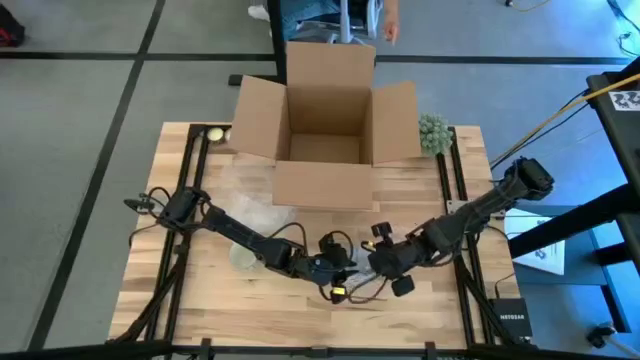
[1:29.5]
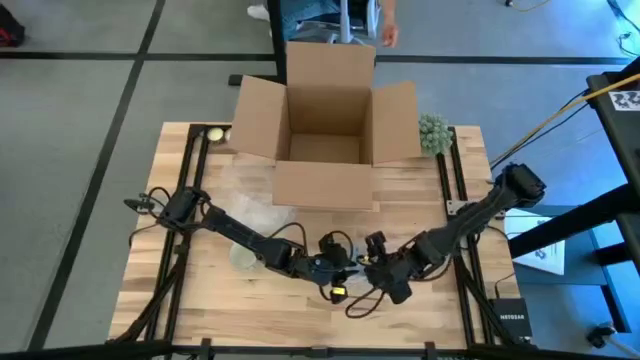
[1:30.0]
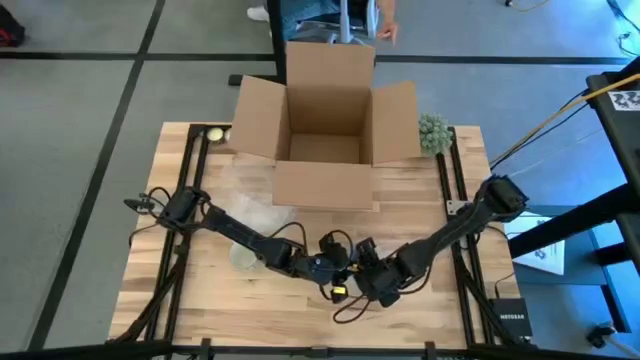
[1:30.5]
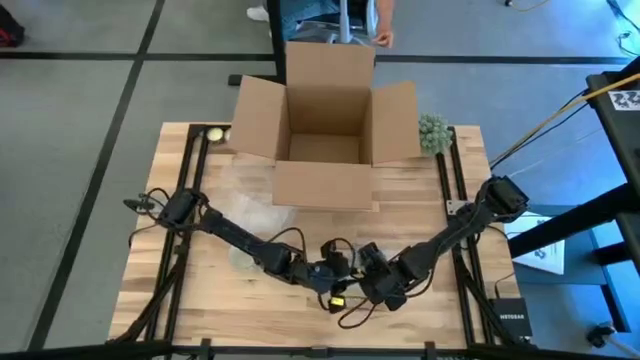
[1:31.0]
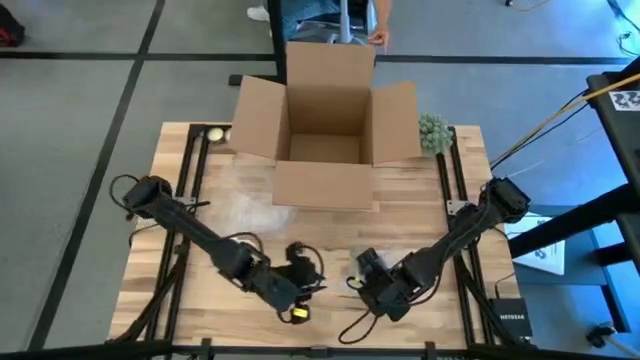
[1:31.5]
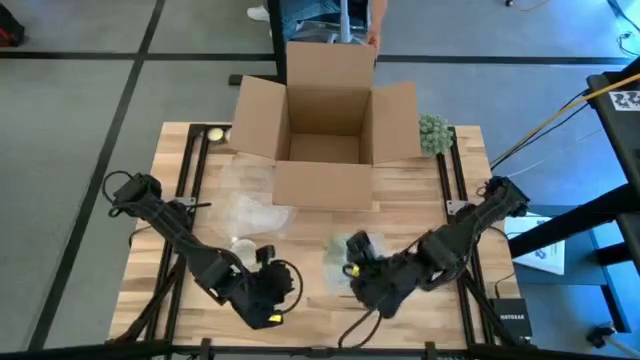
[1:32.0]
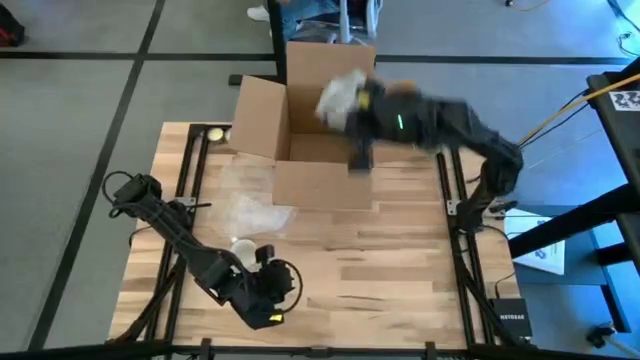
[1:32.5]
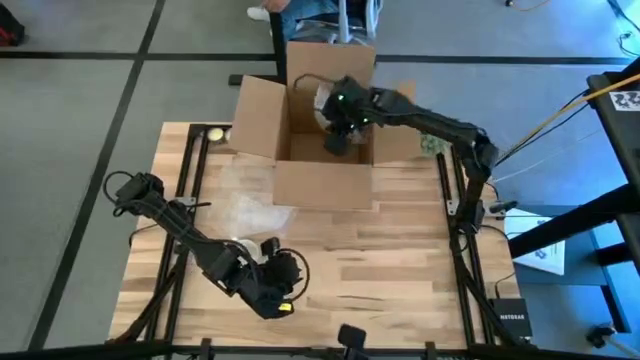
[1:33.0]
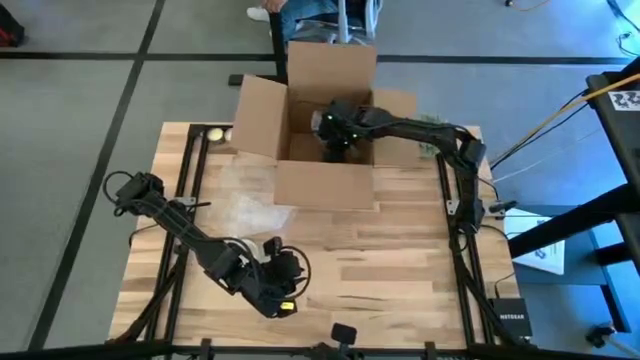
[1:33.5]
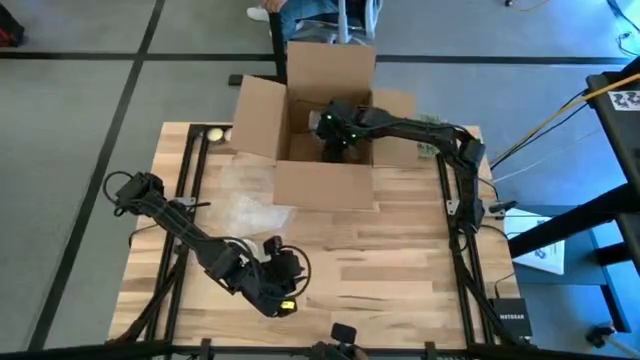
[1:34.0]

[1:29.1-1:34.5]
Task: wrap mug
Put the green mug into the box

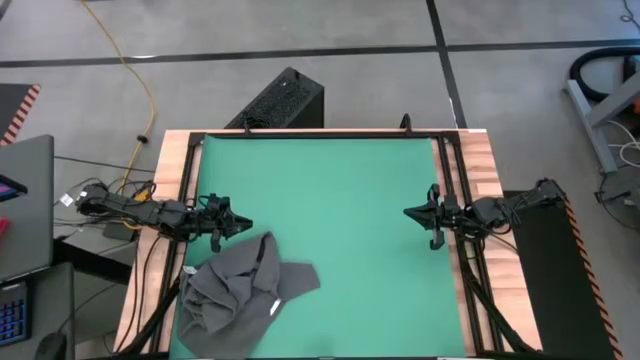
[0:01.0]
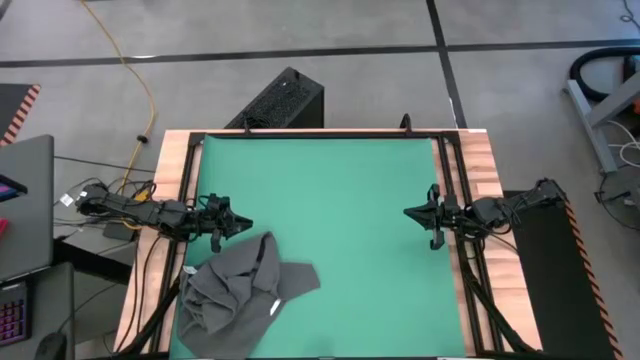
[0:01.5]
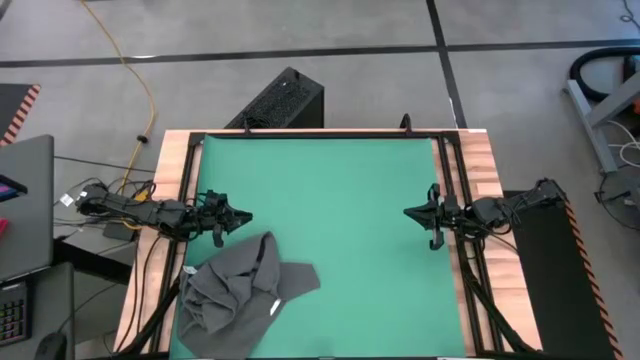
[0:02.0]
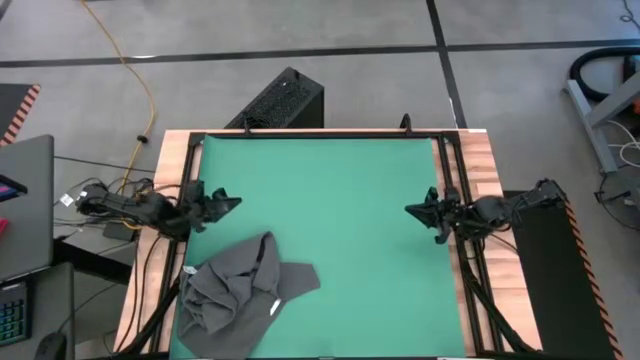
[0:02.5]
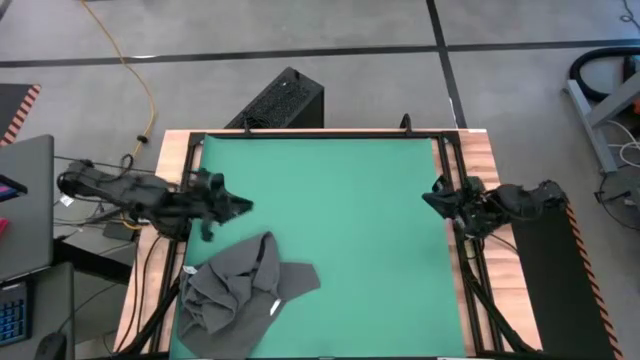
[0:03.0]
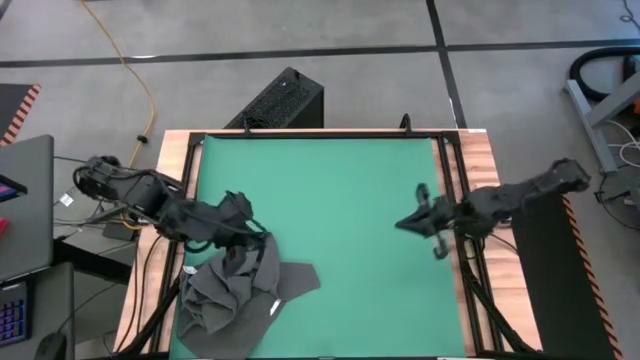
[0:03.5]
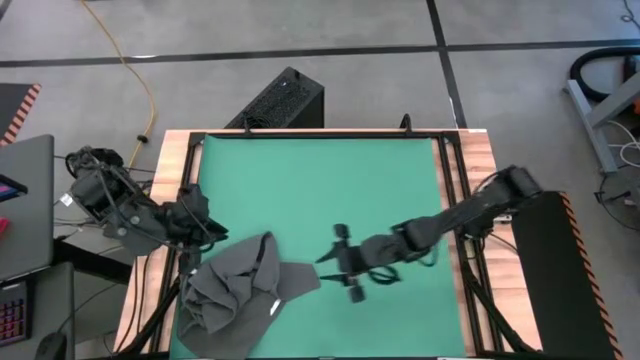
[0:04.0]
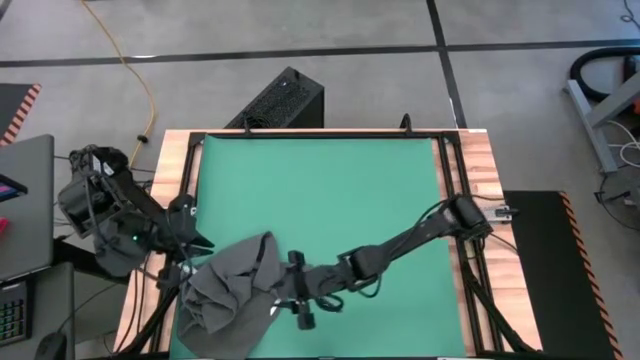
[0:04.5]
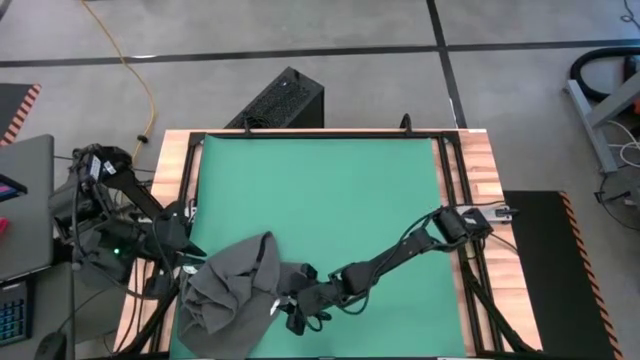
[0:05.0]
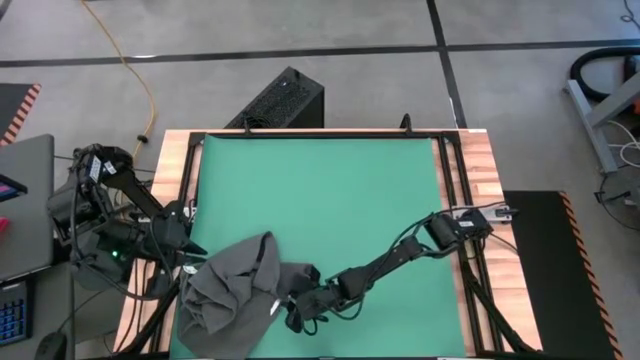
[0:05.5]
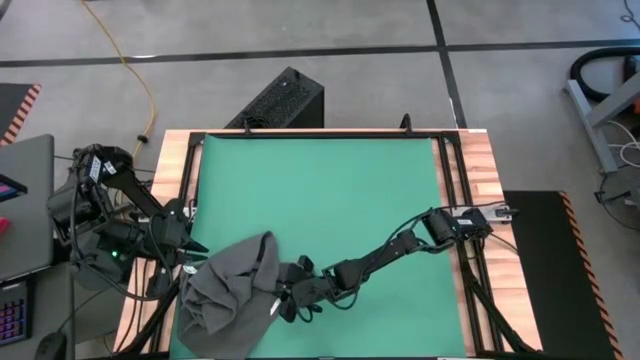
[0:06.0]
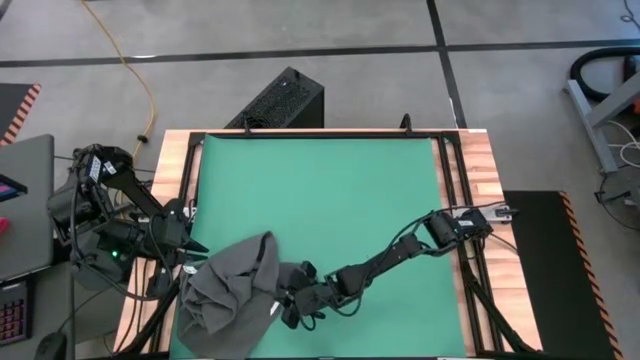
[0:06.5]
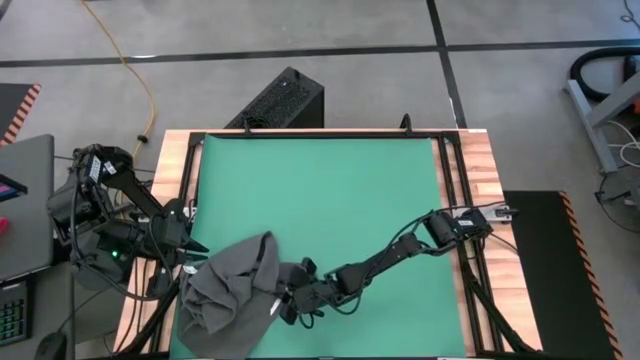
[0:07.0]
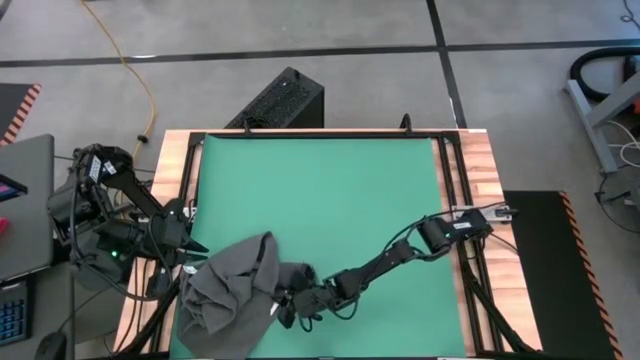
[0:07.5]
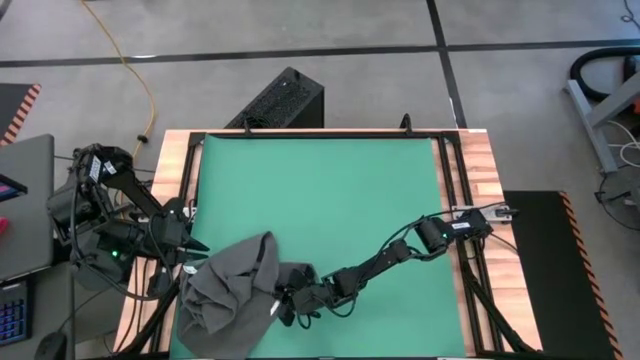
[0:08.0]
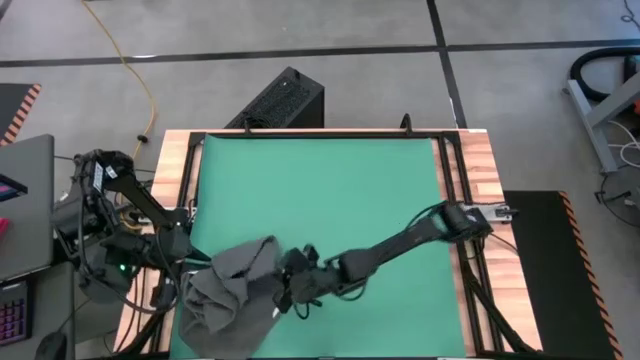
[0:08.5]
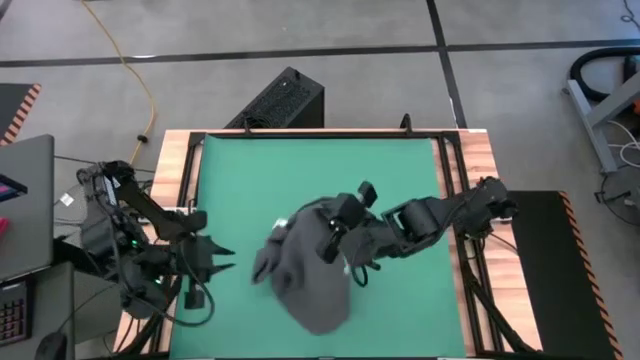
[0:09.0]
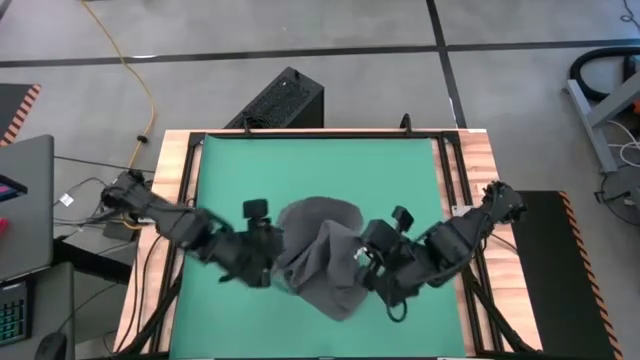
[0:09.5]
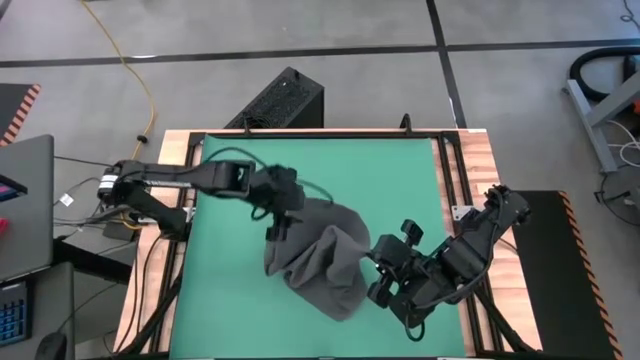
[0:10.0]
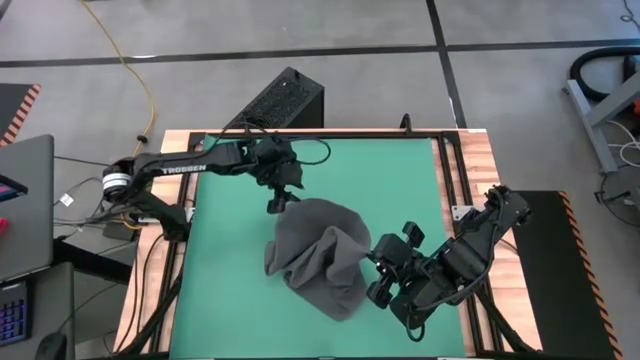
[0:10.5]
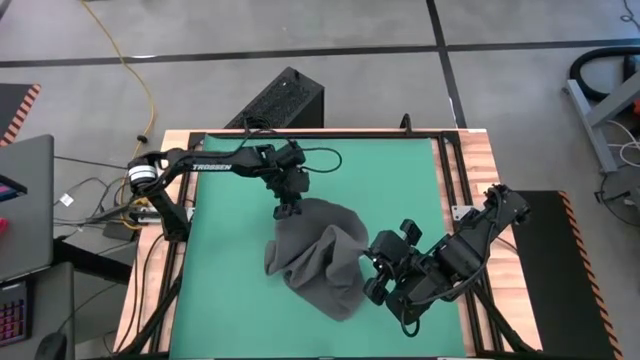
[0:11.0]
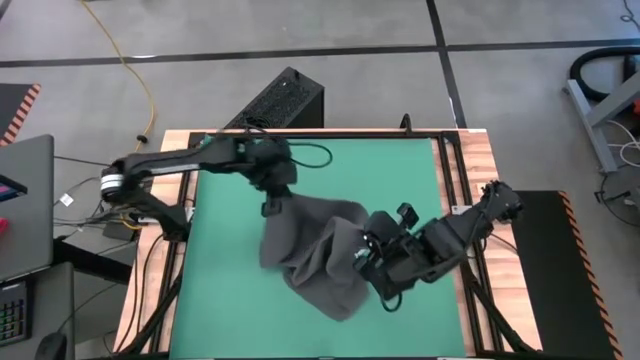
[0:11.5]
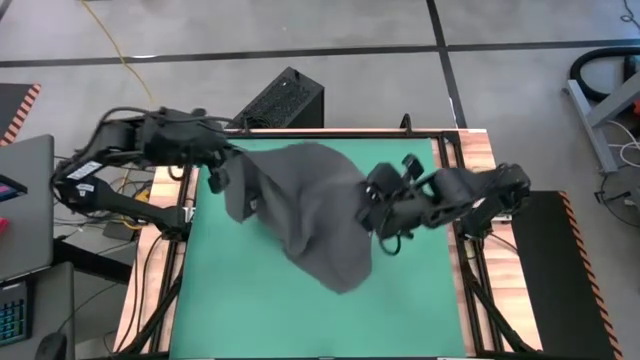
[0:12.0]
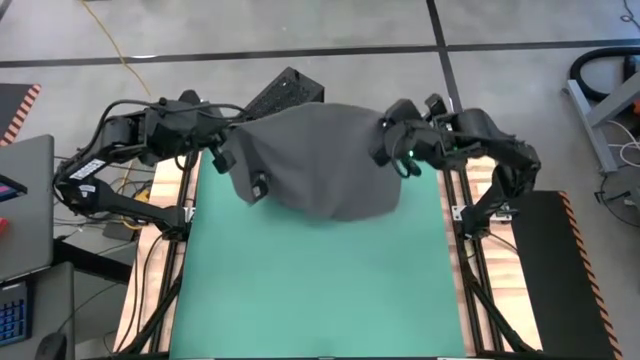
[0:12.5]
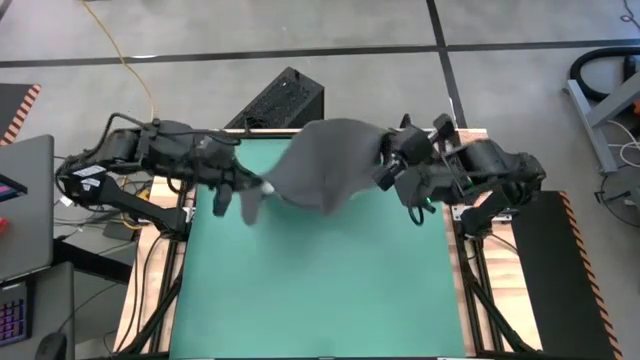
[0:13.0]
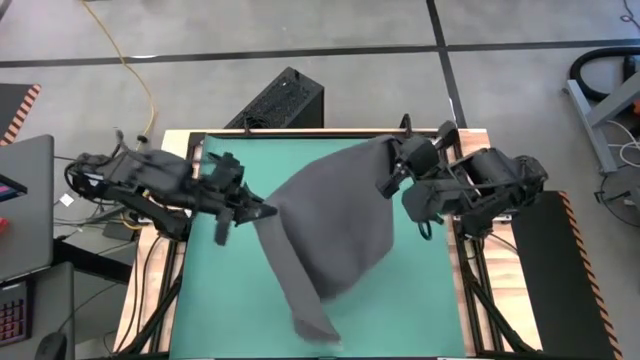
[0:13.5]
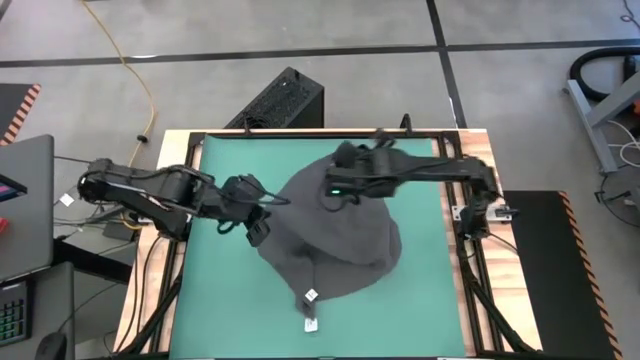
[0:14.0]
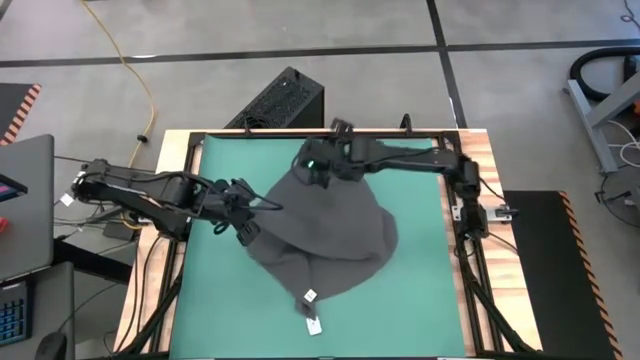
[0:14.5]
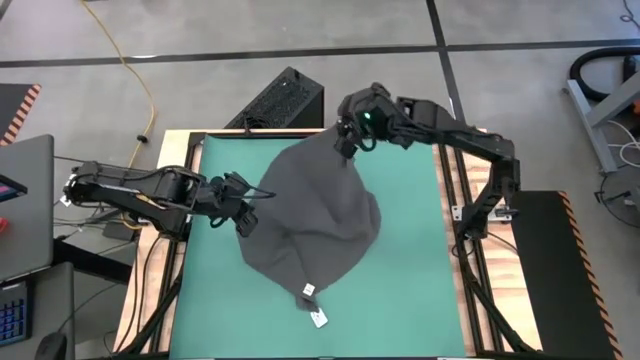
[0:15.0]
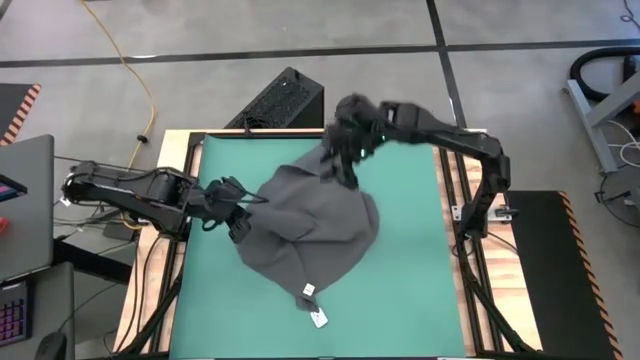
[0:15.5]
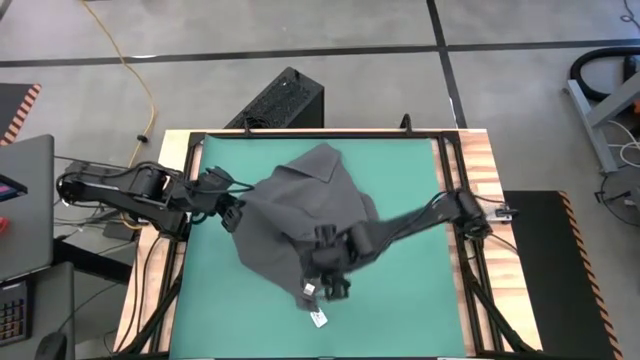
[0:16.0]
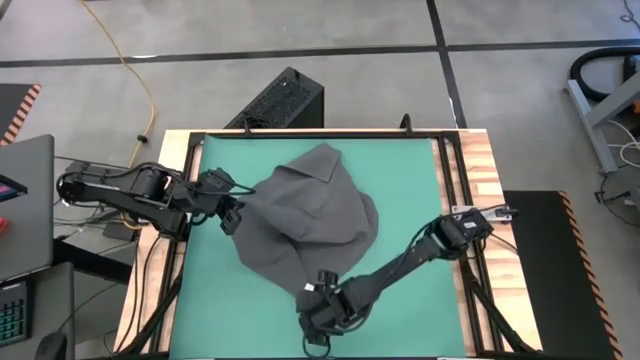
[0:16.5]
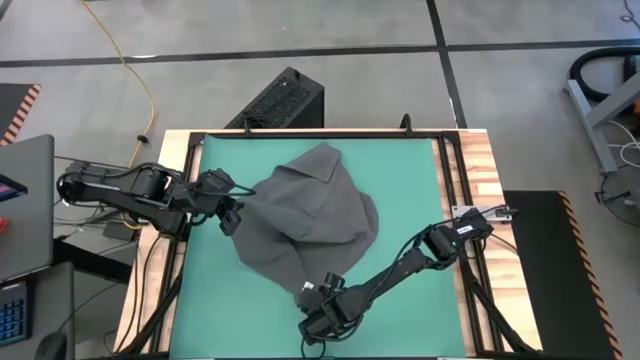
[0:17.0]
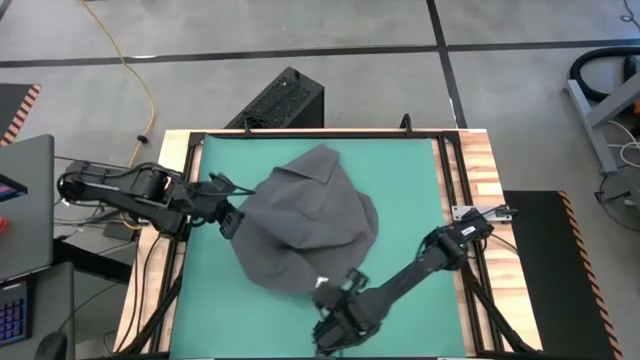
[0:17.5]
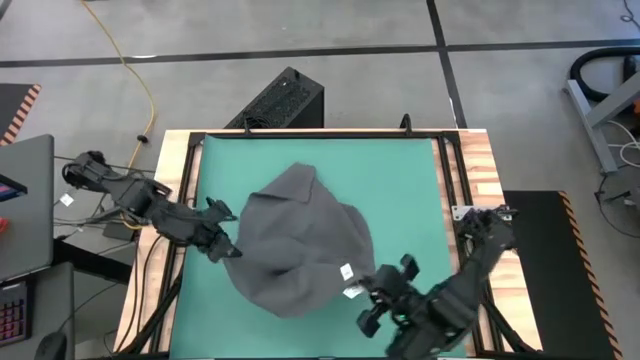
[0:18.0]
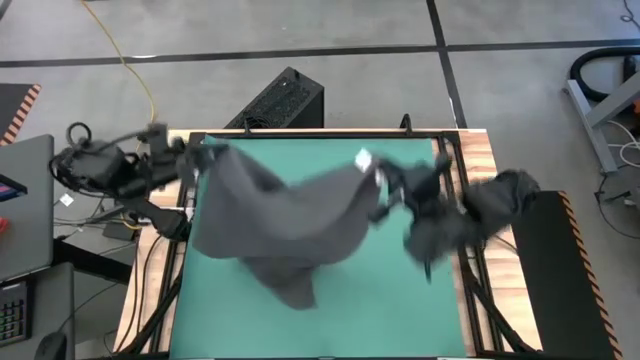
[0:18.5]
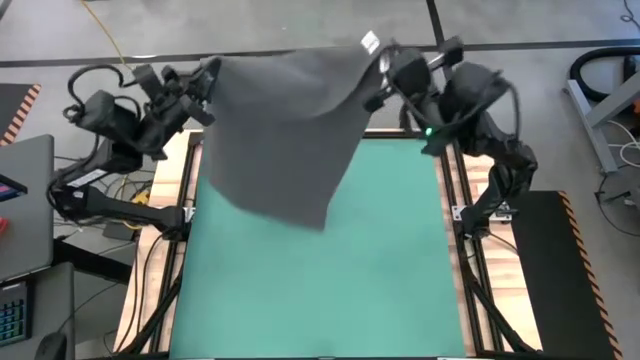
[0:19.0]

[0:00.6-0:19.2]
Task: Roll towel
Fold the gray towel
